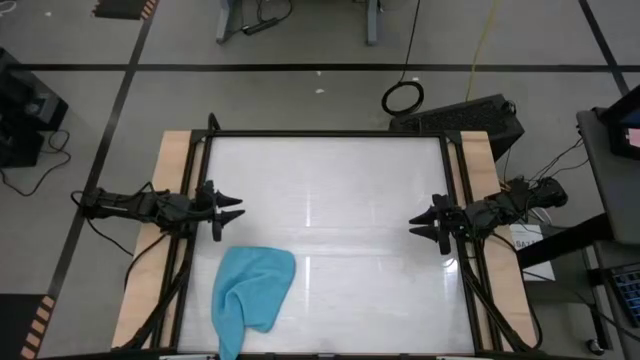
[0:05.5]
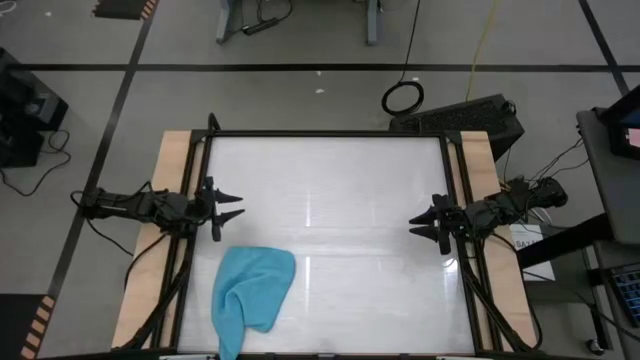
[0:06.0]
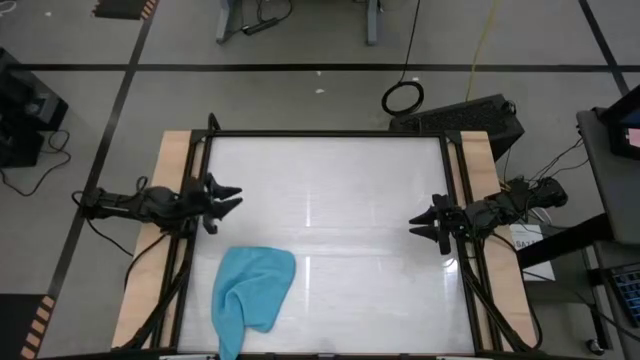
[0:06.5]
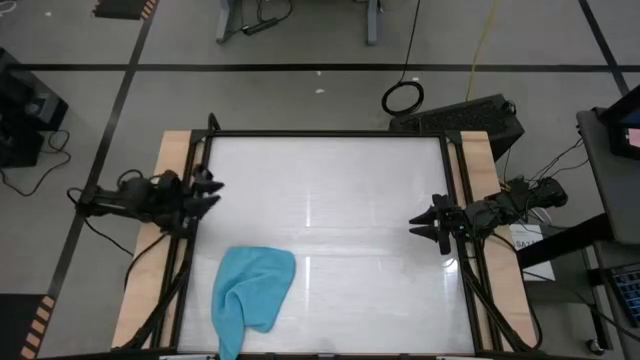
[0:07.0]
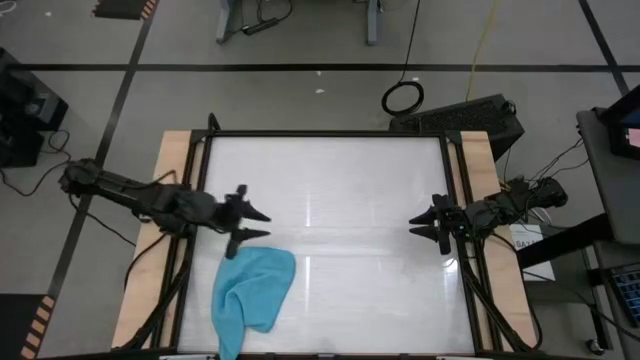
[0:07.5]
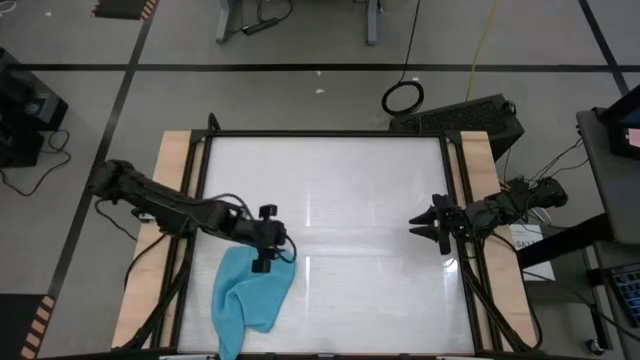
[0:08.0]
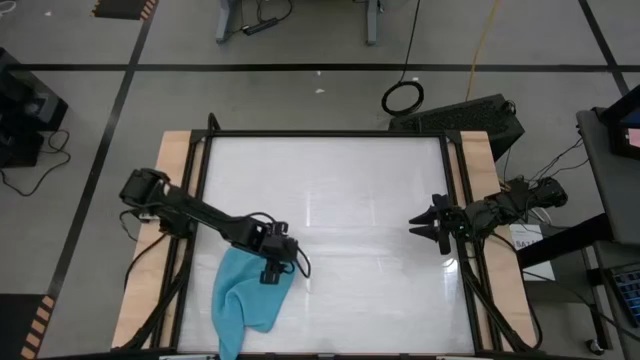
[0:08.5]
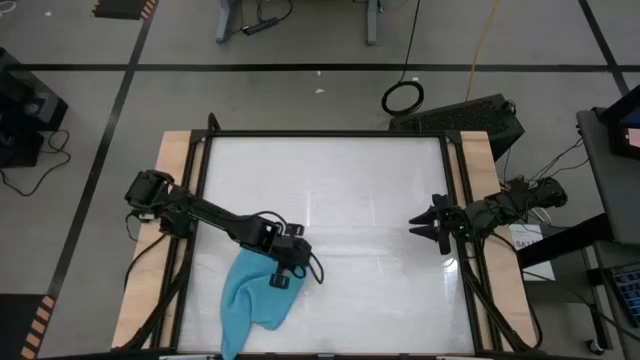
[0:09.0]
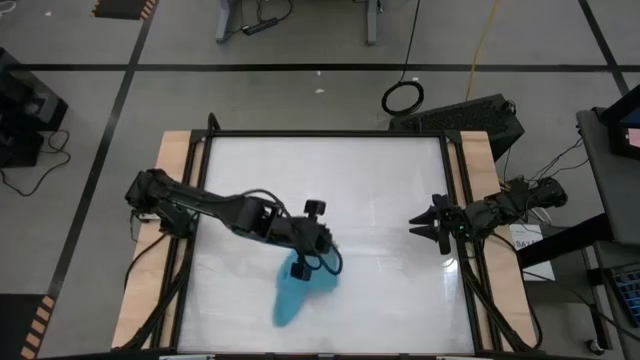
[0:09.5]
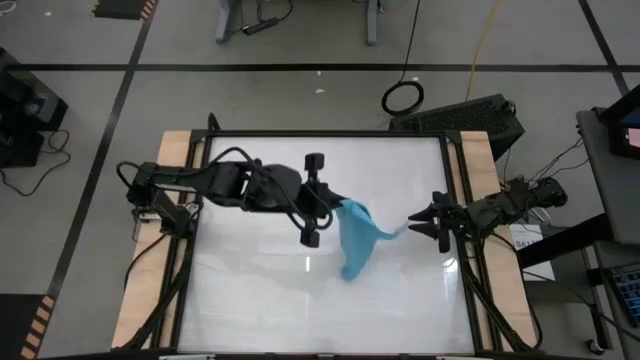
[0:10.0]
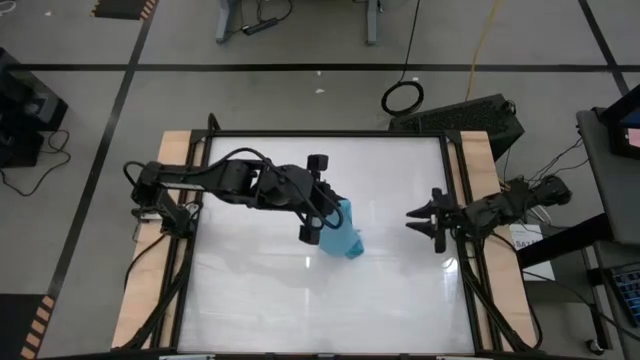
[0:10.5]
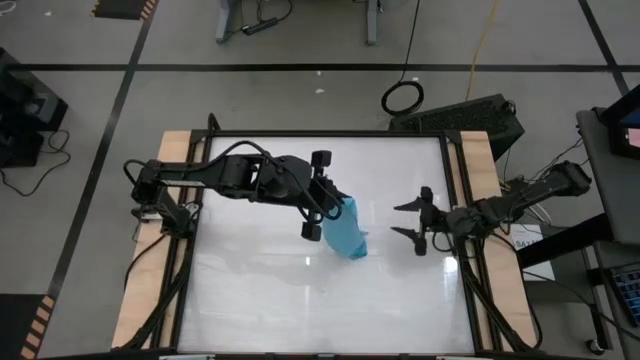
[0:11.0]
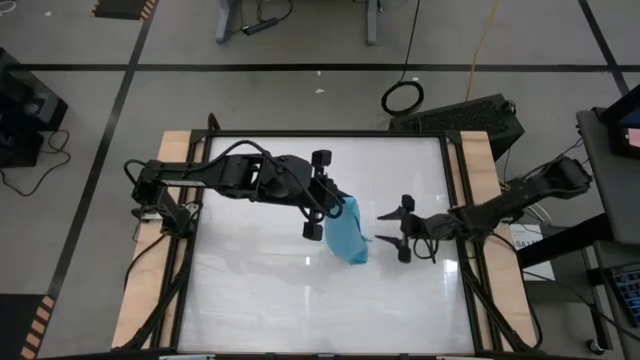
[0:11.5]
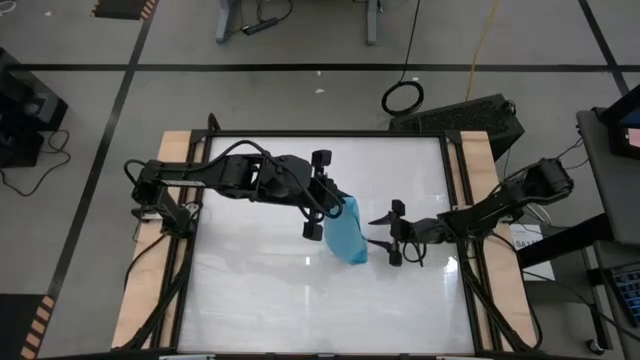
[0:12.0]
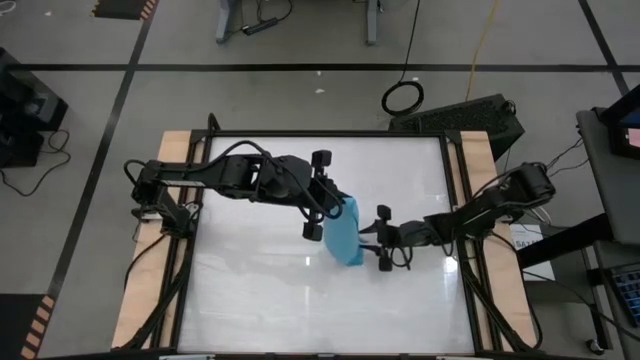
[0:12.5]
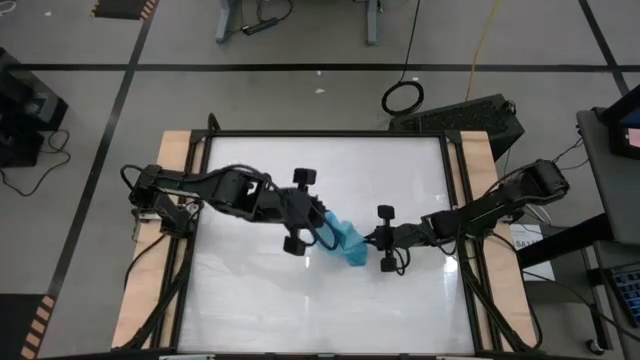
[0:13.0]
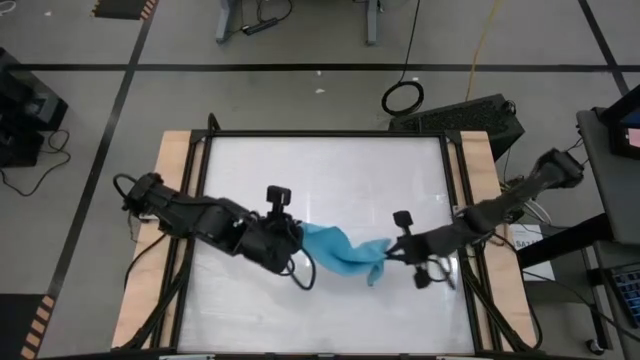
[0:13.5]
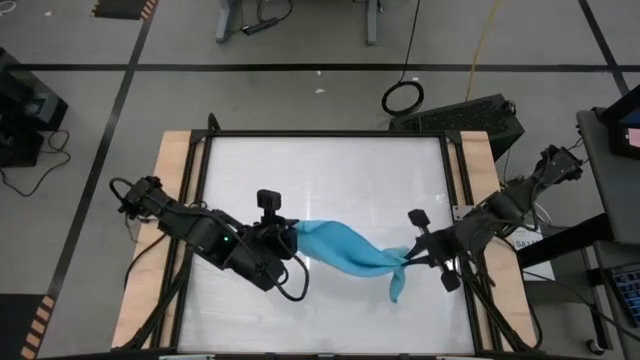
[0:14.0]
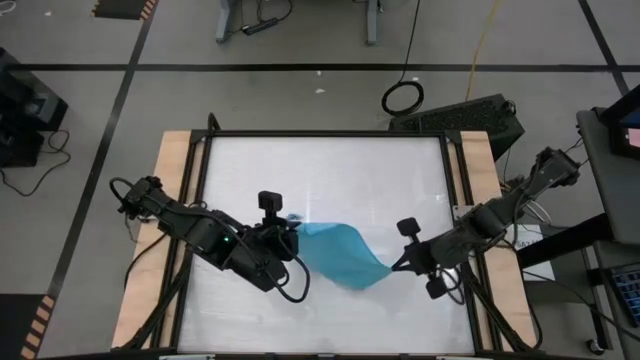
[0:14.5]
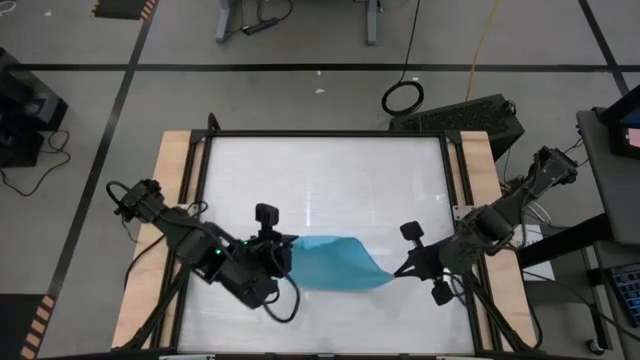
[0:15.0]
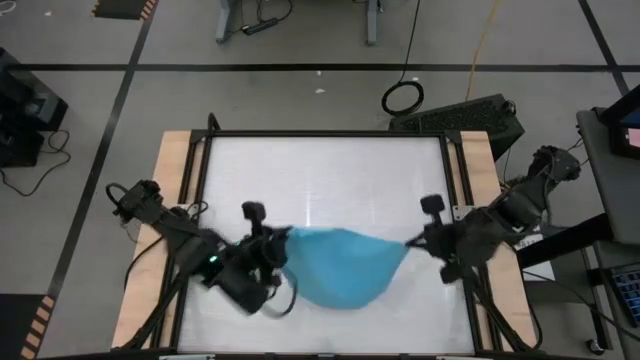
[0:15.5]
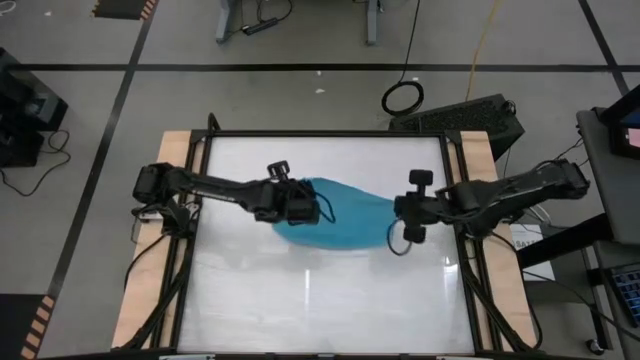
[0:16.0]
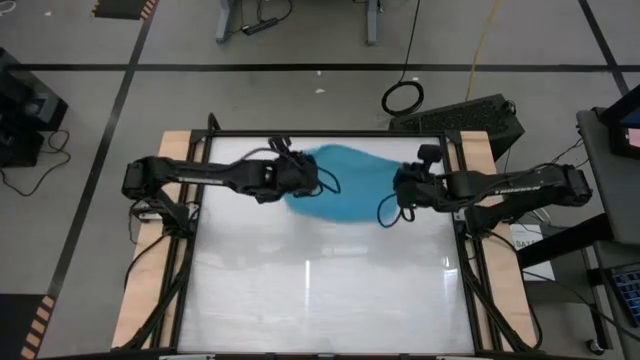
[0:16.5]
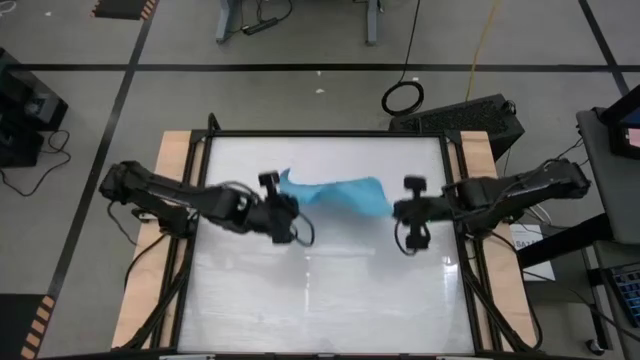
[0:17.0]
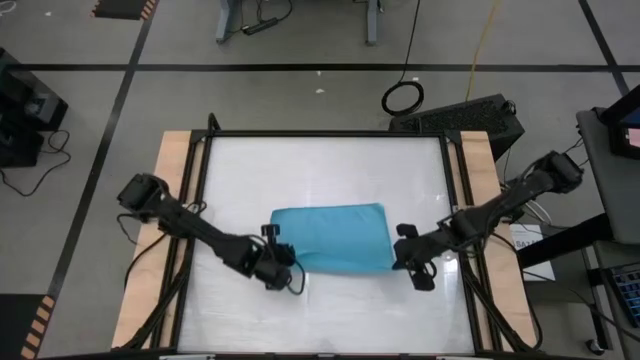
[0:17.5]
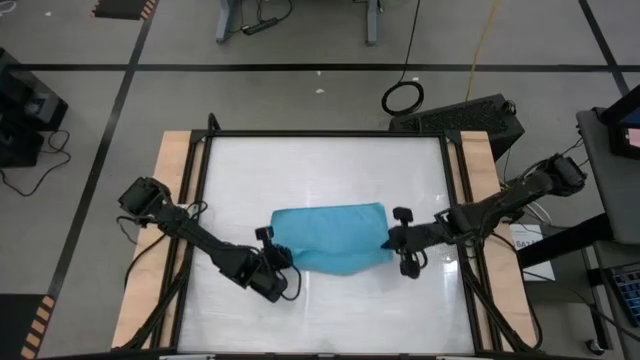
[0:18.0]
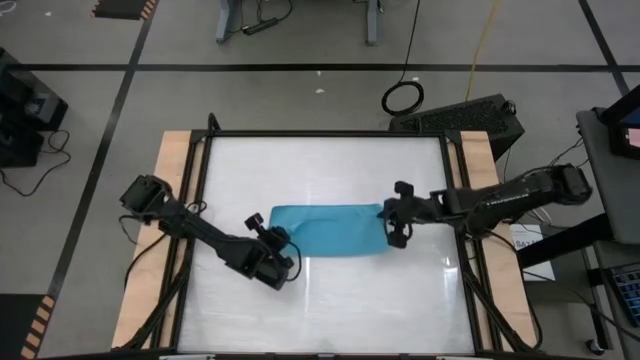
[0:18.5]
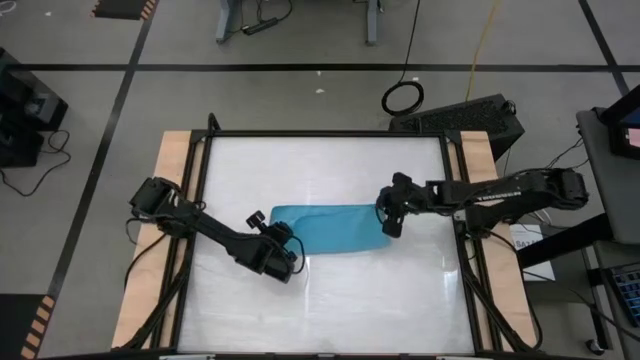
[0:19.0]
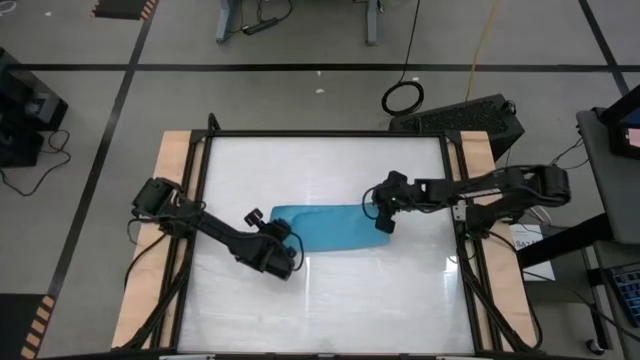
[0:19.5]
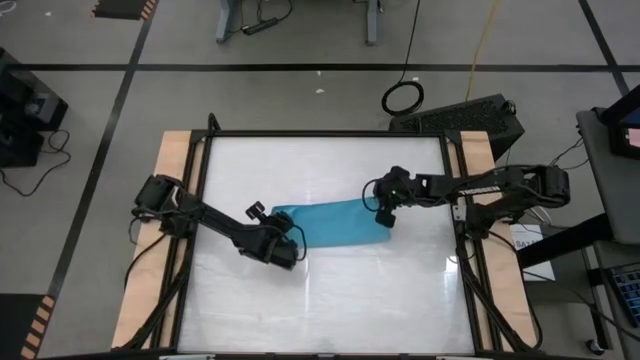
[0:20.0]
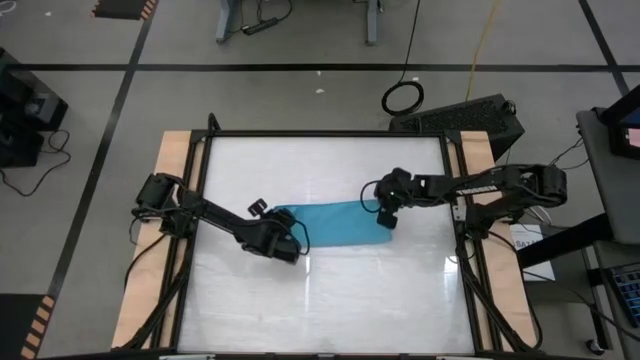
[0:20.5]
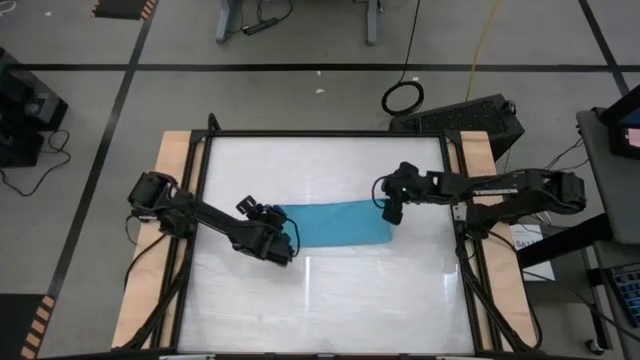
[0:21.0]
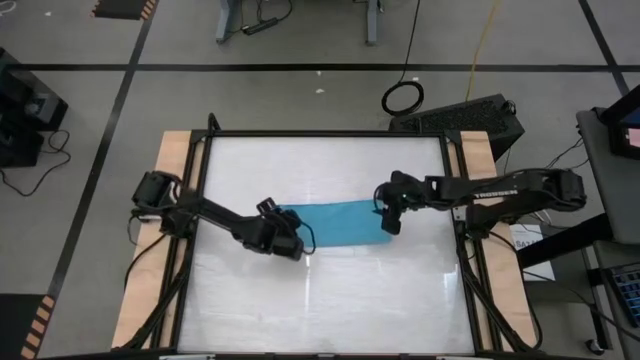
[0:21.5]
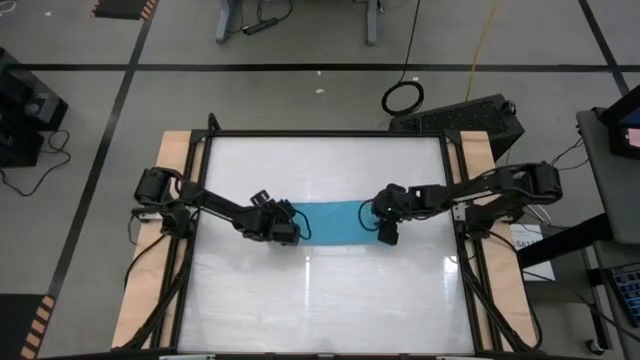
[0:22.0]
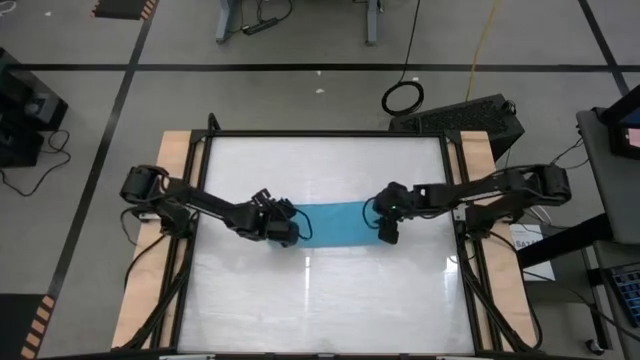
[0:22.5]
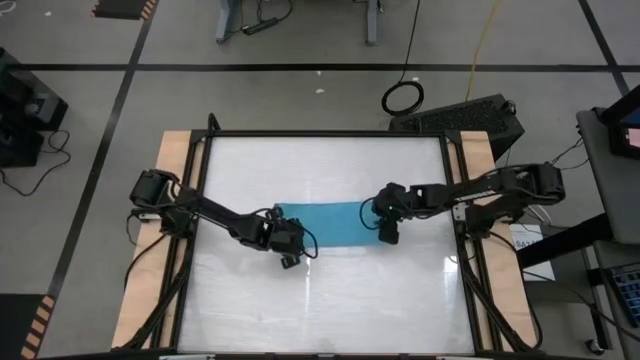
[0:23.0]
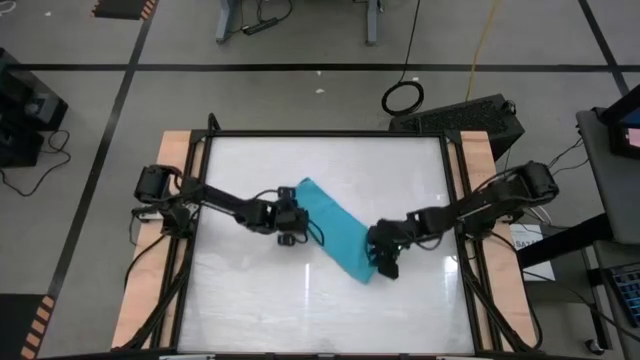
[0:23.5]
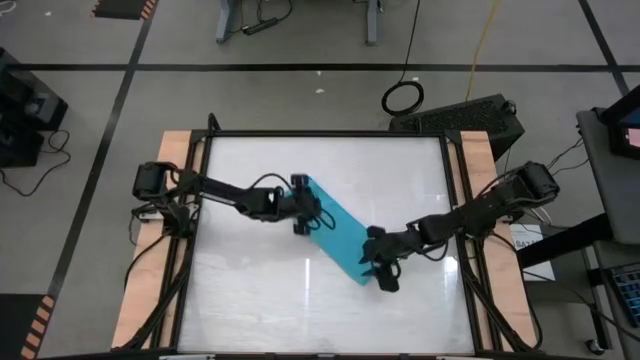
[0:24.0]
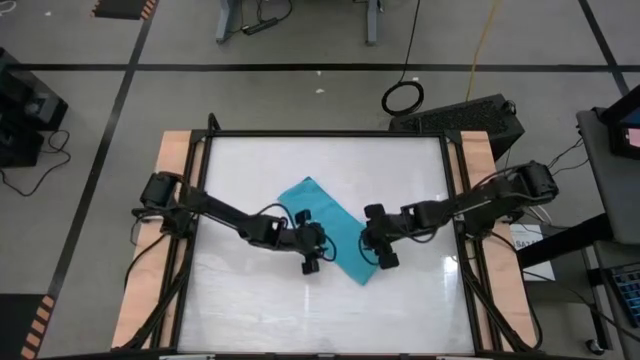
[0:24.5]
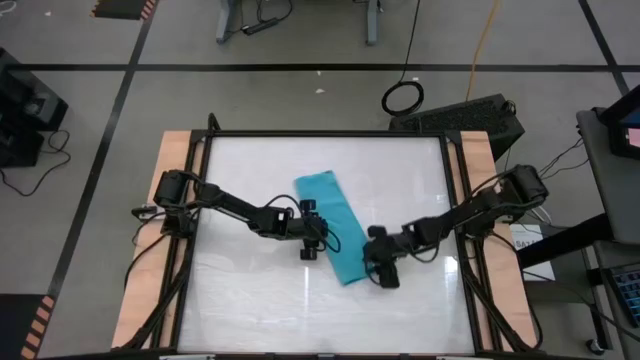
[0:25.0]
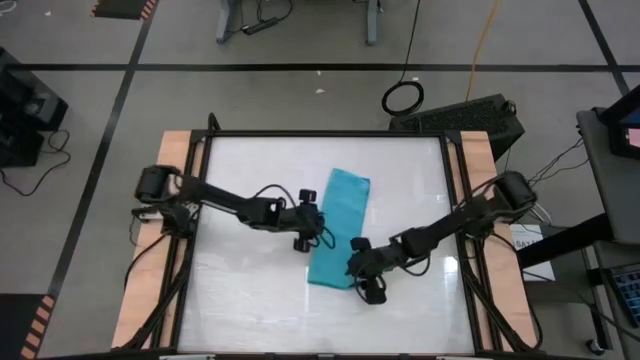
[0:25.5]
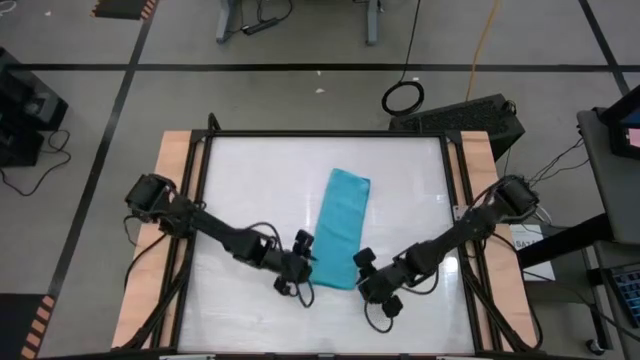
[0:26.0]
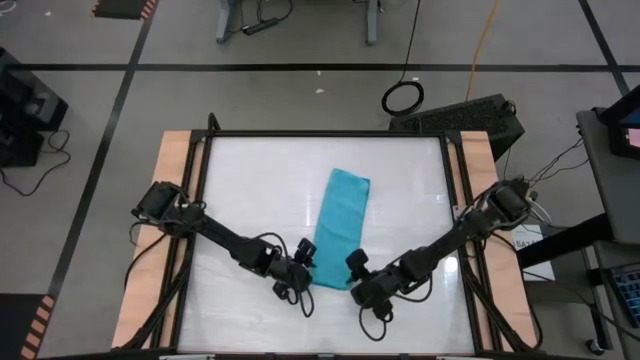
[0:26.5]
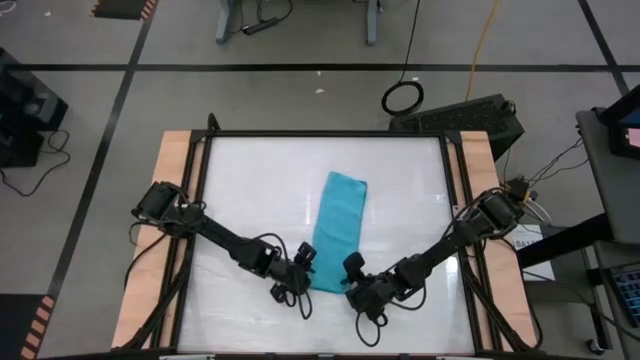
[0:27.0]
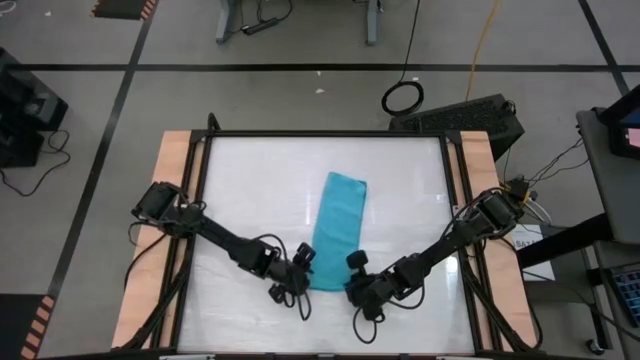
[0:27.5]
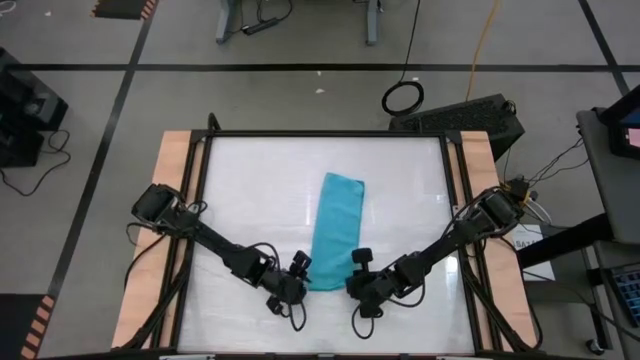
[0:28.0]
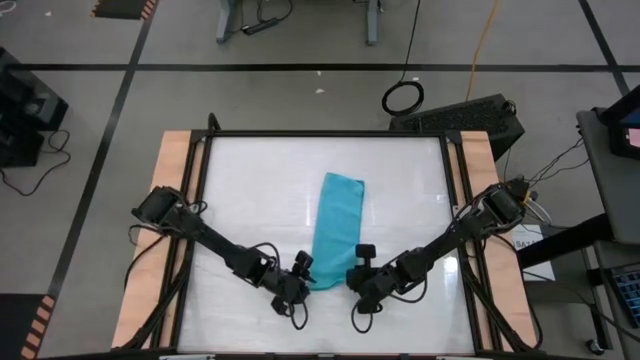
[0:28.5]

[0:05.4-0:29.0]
Task: Roll towel into tight, uniform cylinder
Roll the blue microfiber towel
